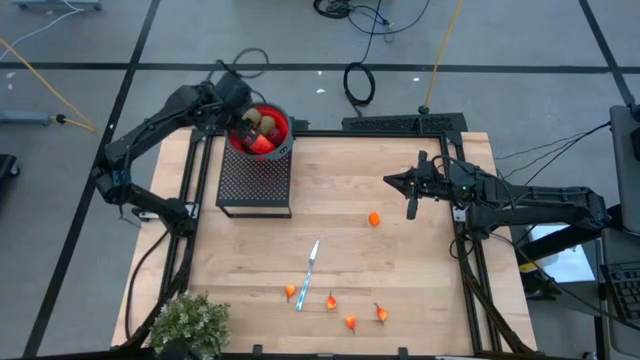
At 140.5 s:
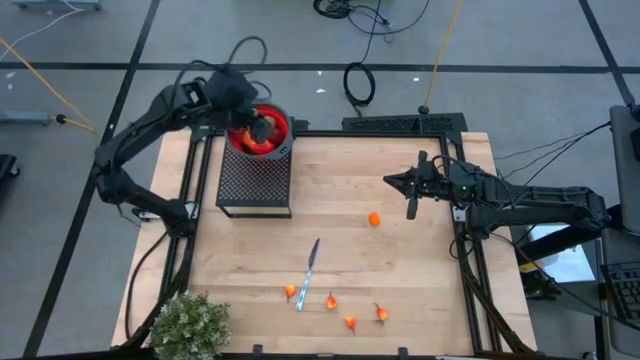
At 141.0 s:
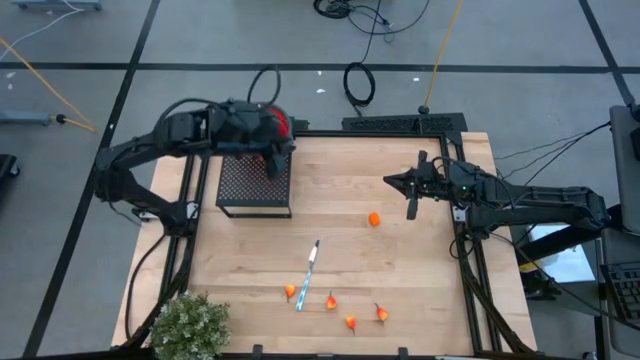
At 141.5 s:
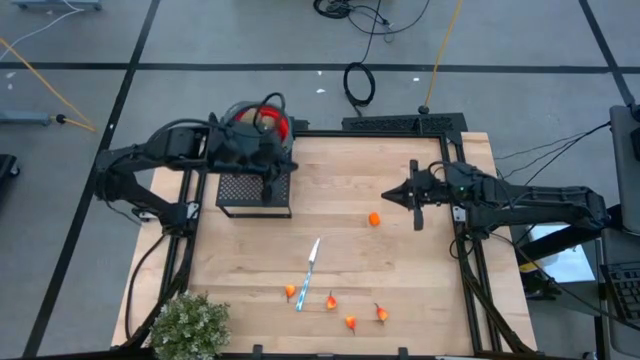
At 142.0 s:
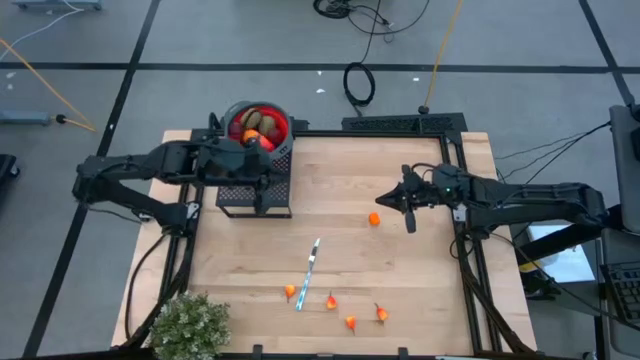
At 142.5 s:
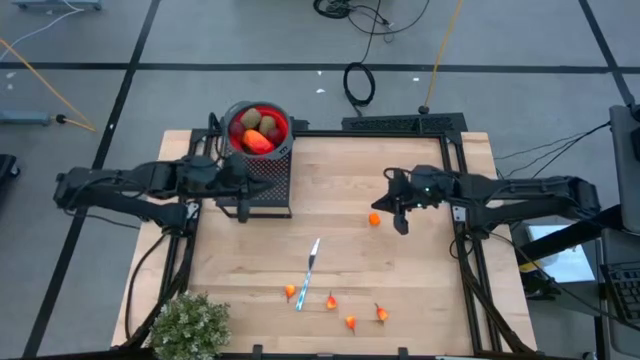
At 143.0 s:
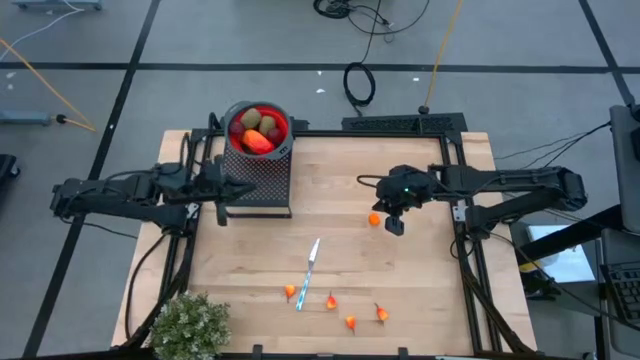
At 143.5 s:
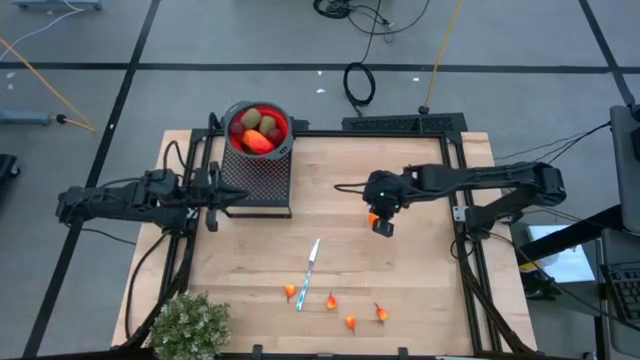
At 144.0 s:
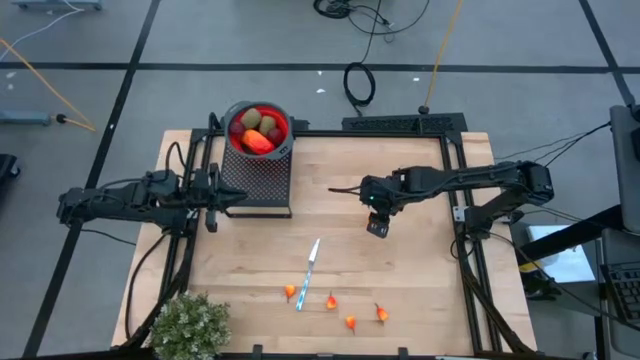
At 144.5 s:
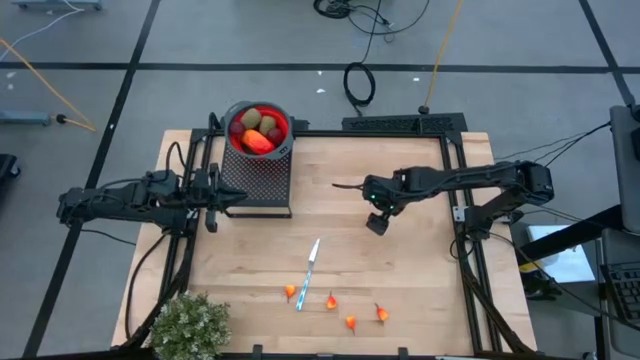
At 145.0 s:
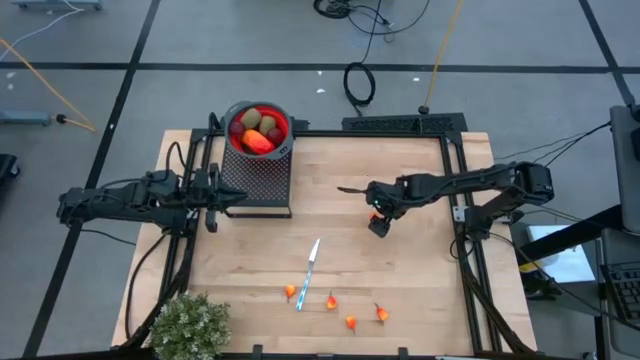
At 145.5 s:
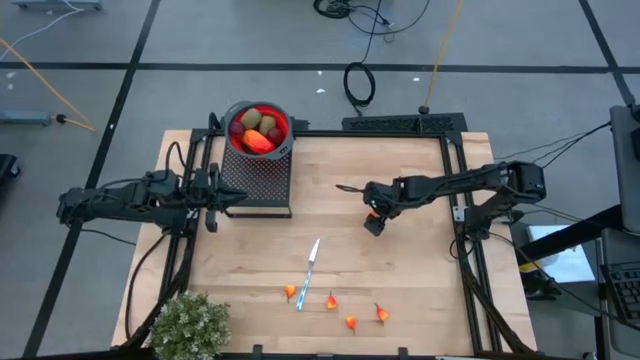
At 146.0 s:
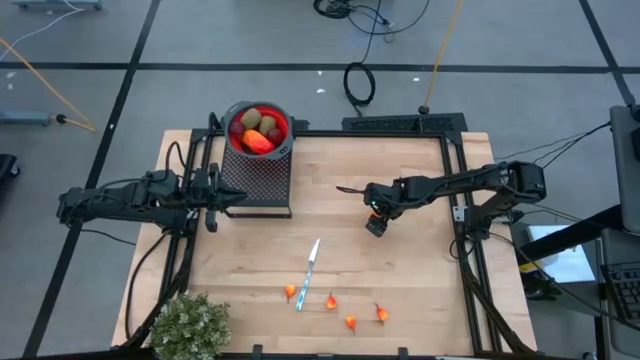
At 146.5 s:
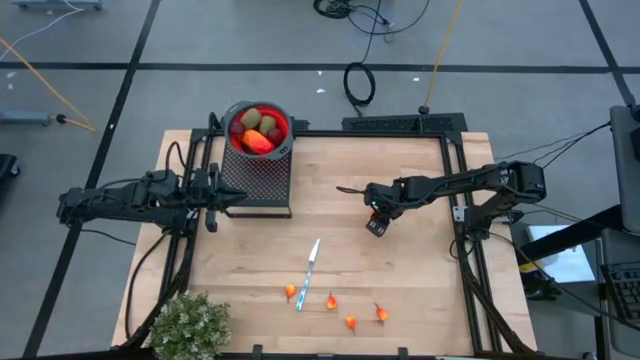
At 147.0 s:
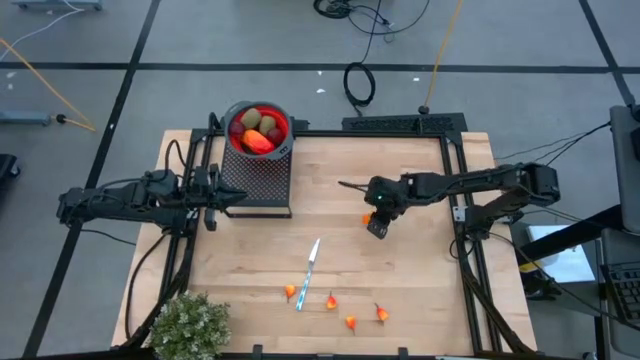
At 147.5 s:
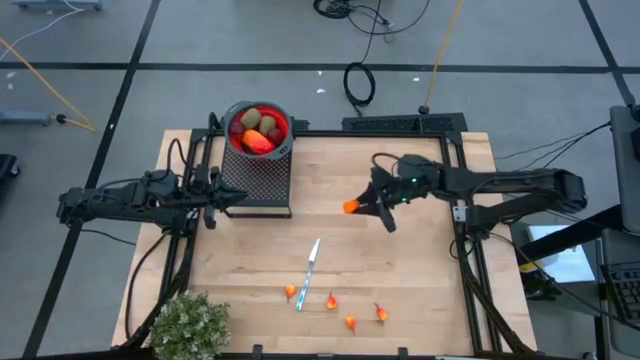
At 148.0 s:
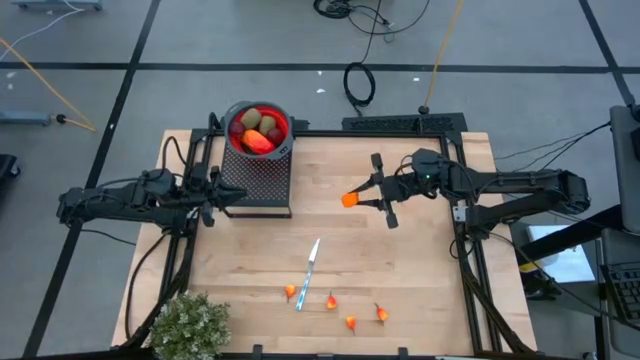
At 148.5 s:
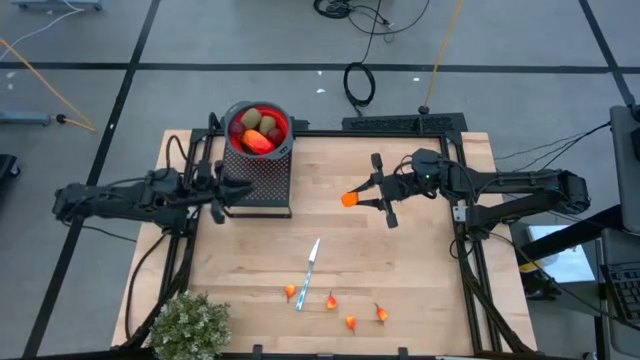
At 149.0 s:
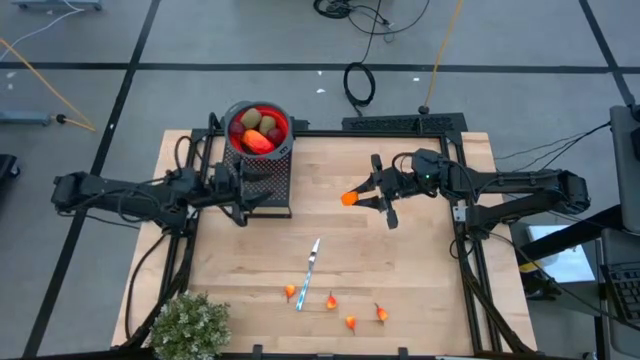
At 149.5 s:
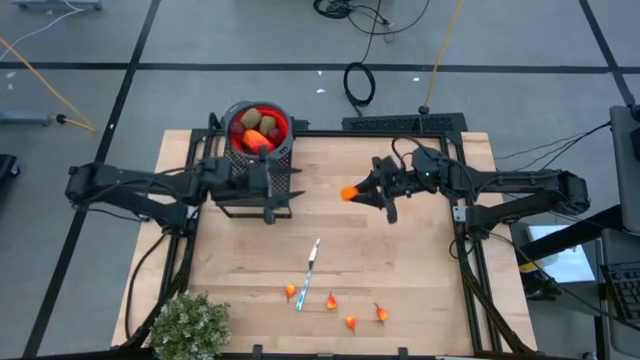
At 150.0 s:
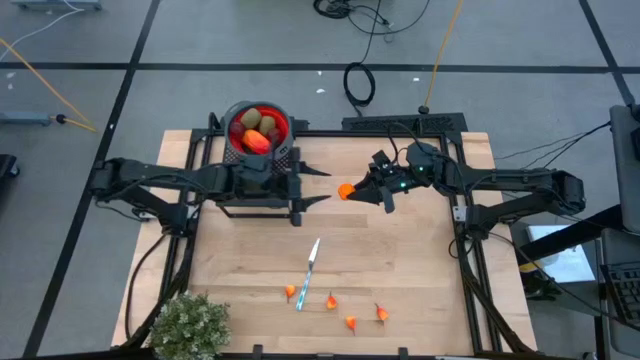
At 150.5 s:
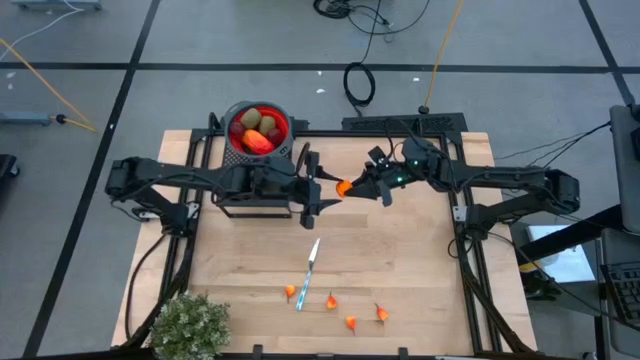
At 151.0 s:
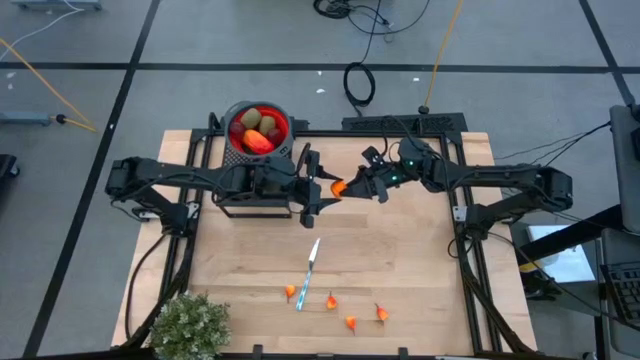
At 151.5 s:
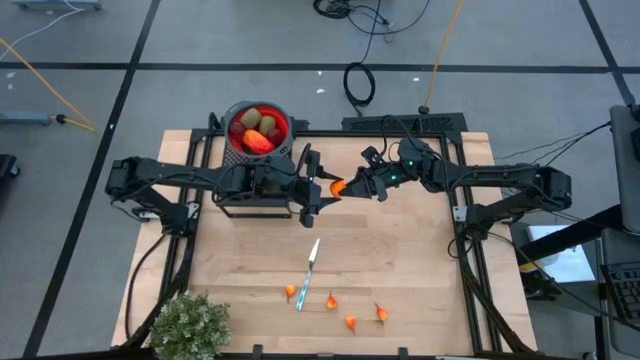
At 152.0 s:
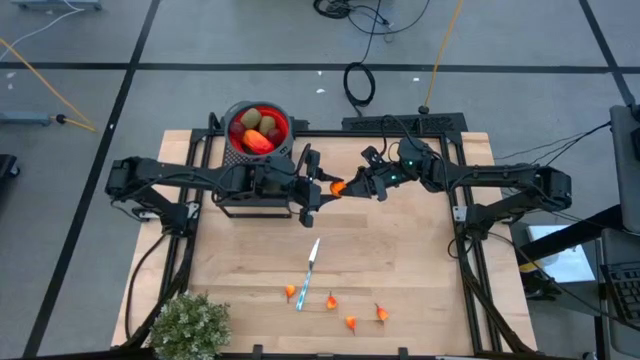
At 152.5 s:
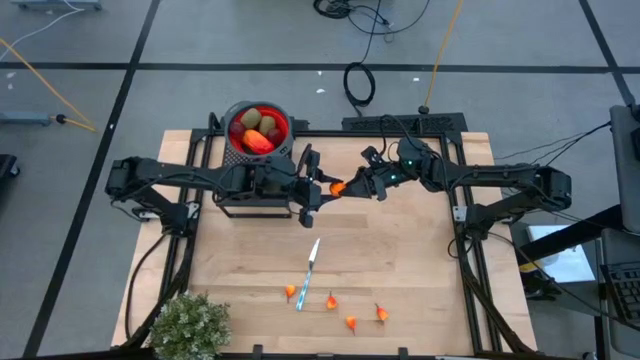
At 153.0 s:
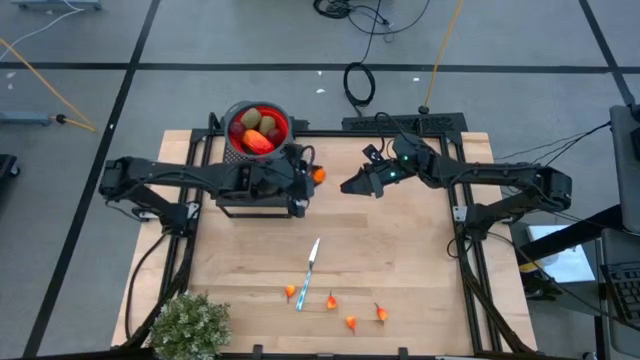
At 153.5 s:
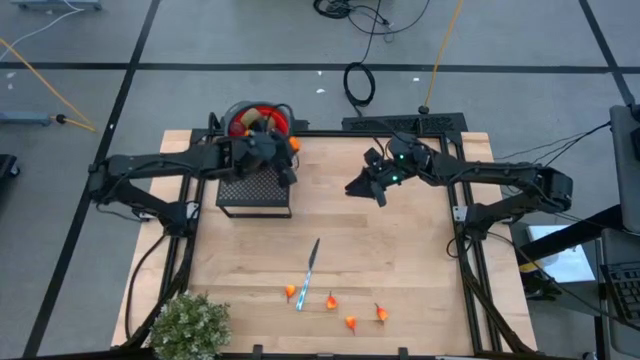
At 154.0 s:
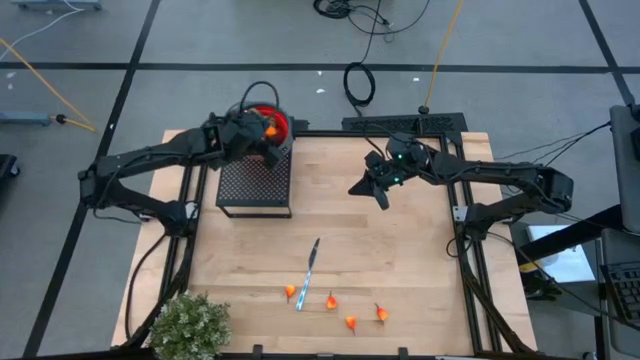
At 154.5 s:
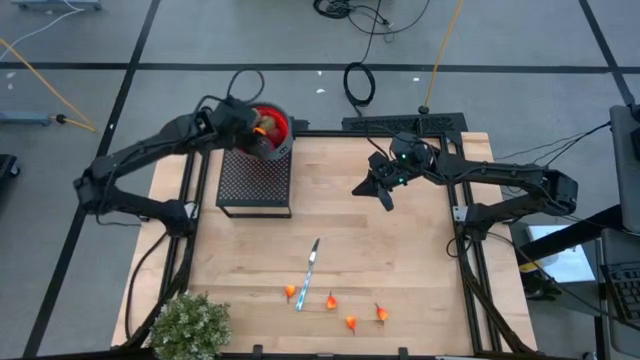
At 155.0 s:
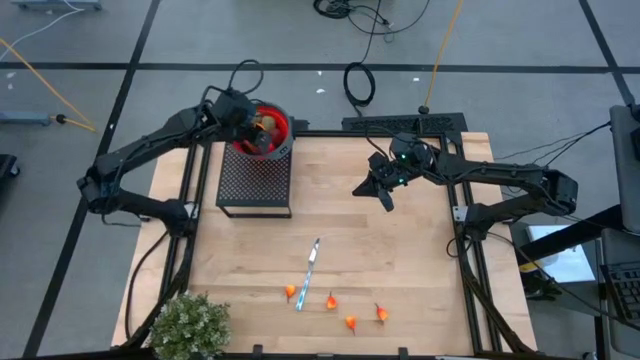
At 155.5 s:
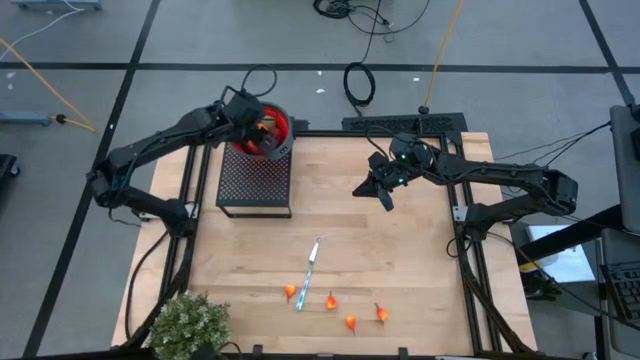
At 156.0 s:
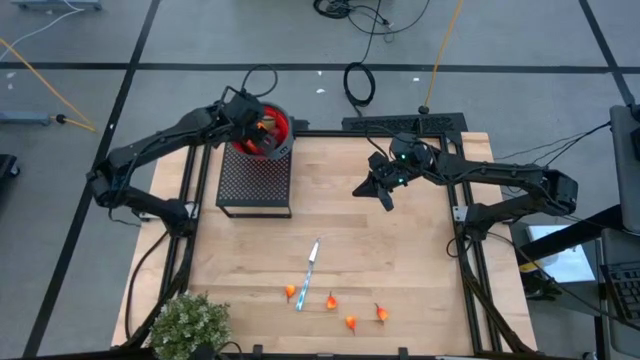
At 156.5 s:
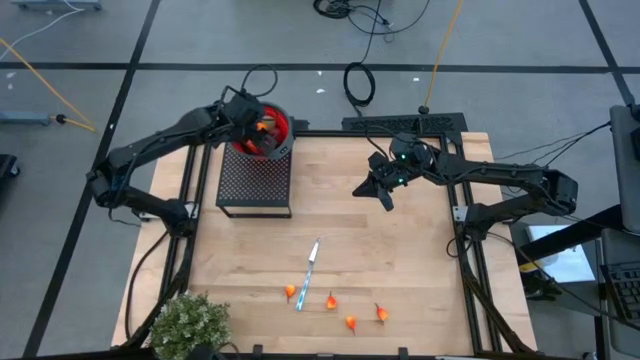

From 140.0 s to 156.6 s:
Task: Pick & Place Fruit
Put the orange into the red strainer bowl on the shelf

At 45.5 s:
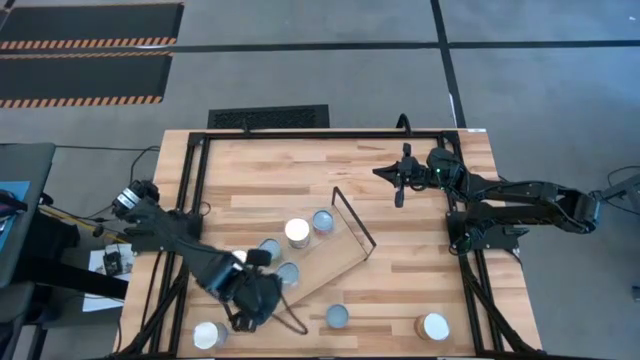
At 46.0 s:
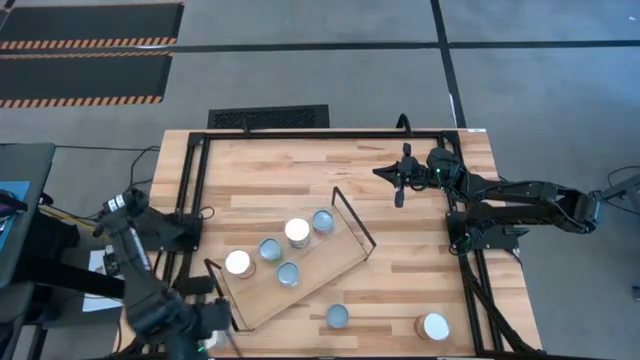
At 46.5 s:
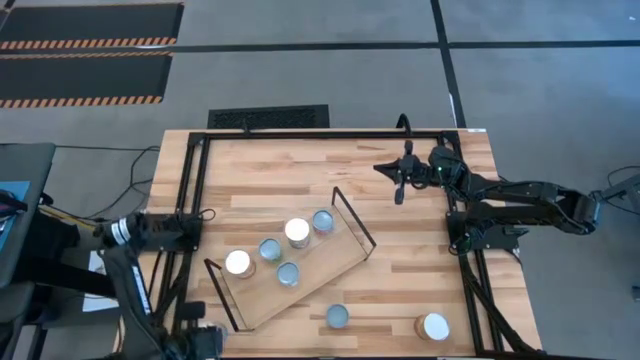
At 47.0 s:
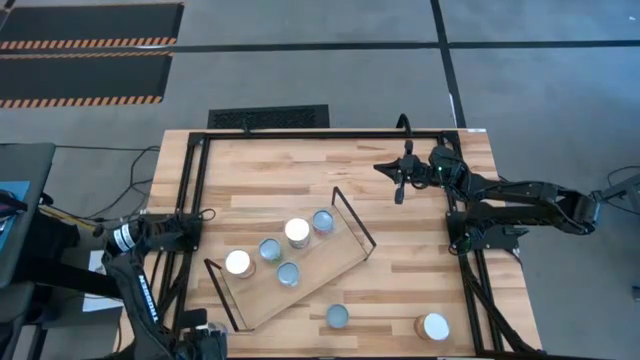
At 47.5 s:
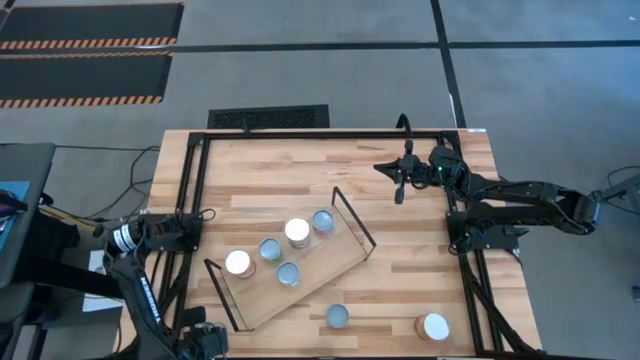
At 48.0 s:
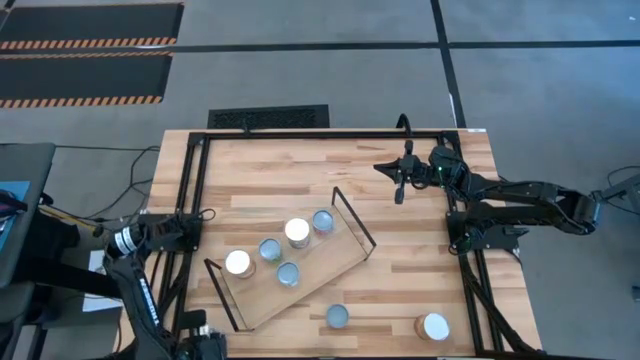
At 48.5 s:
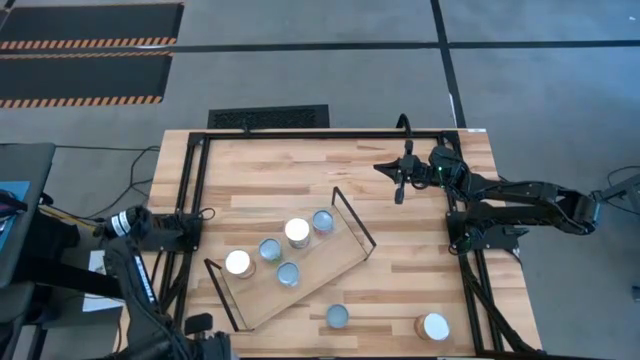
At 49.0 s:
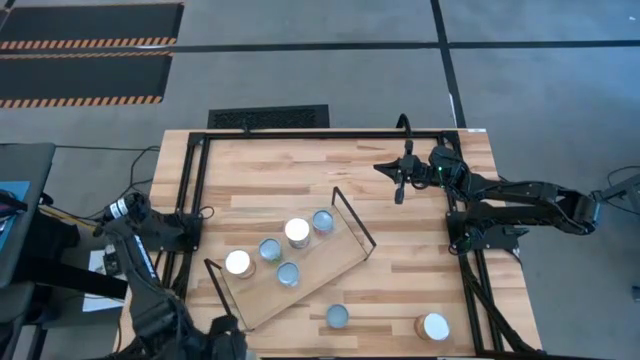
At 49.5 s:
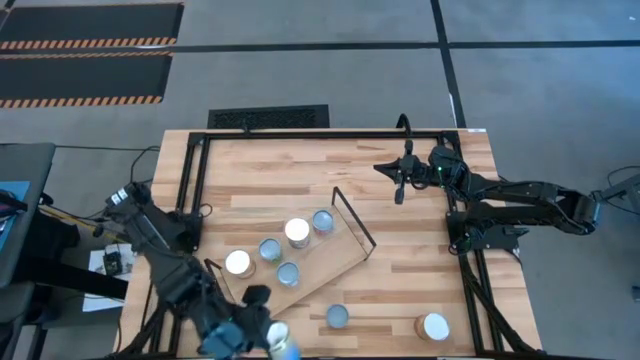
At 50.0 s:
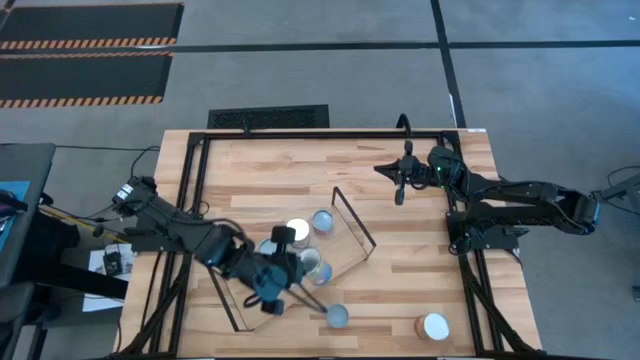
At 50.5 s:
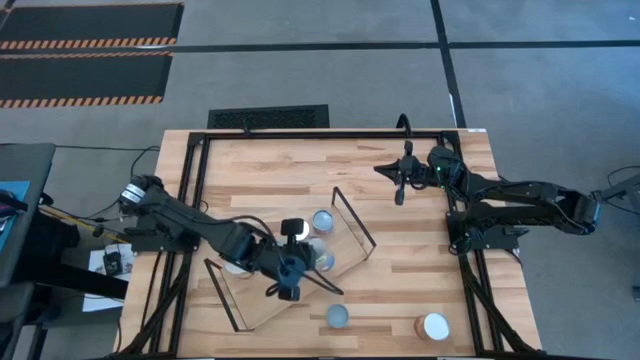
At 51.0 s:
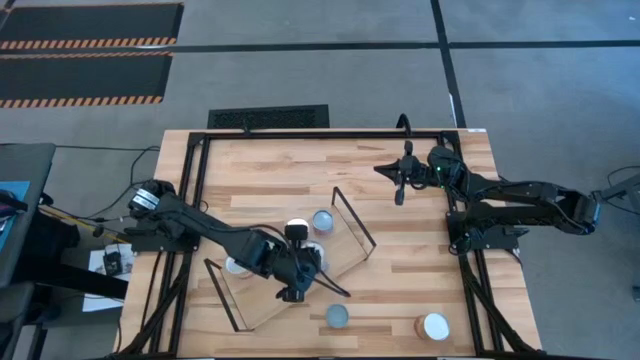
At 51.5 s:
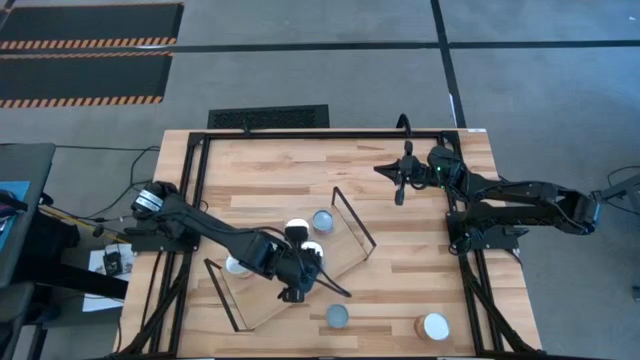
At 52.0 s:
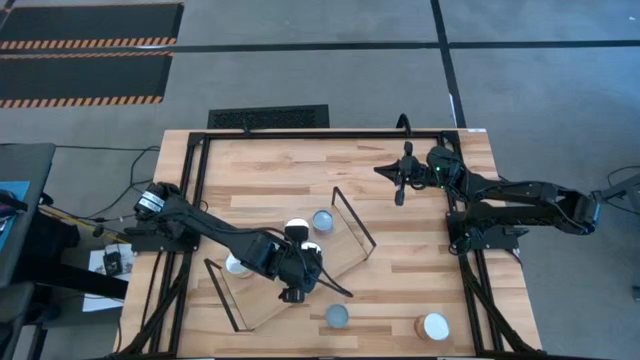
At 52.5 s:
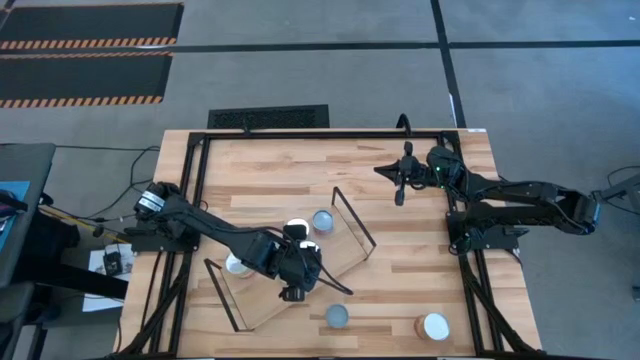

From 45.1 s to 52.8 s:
Task: Pick and place cans onto a shelf
Put the canned peaches on the shelf
